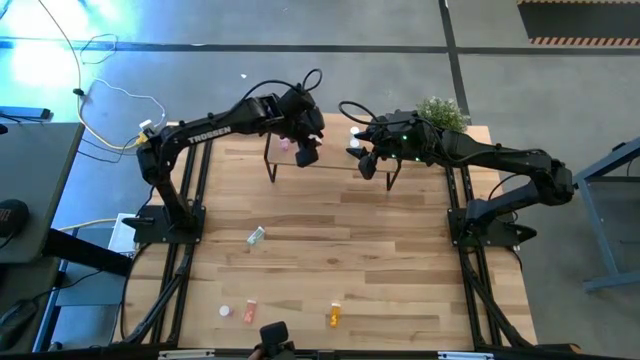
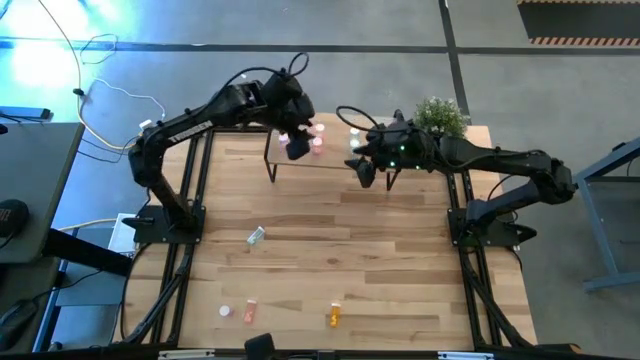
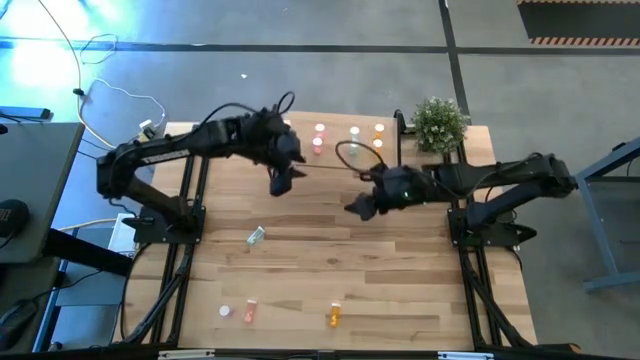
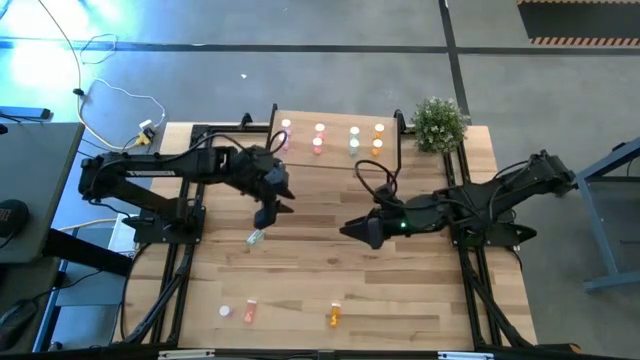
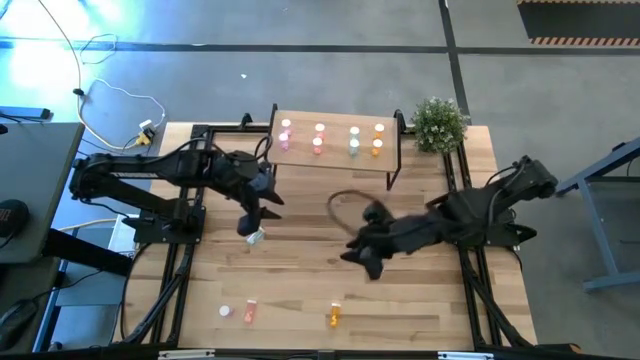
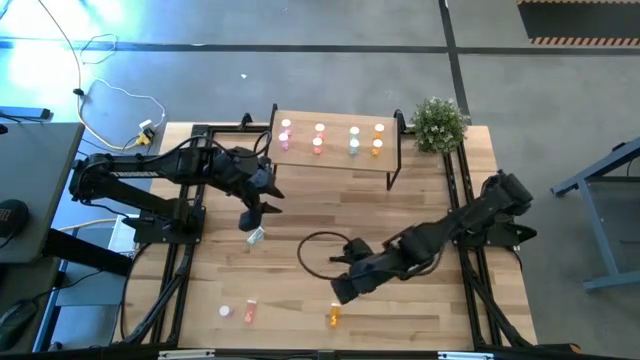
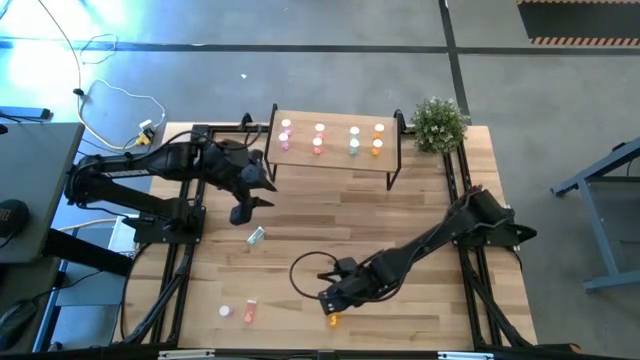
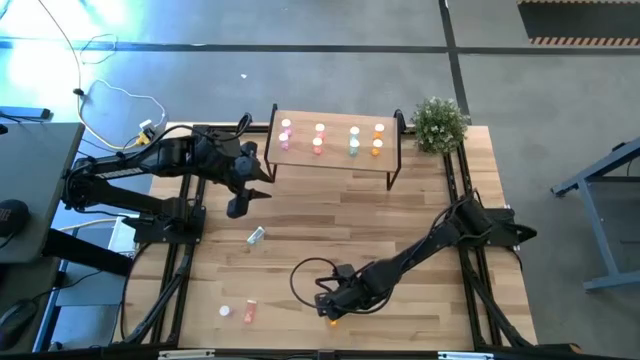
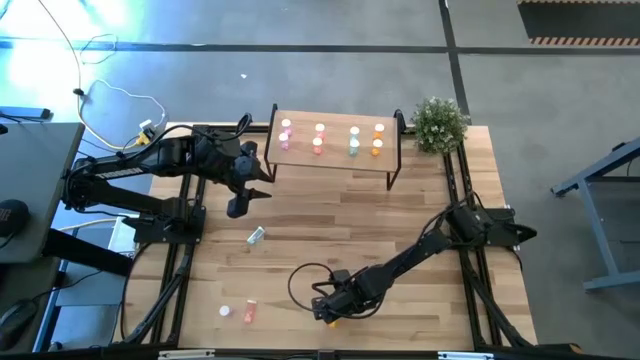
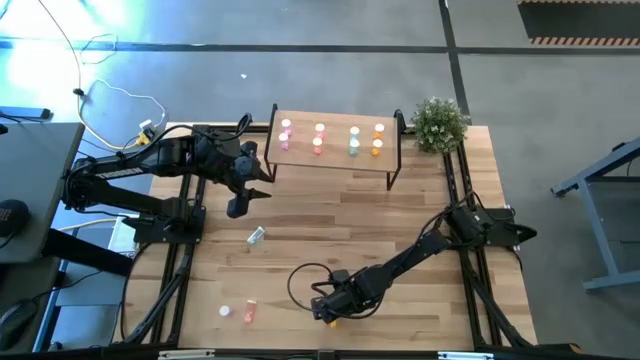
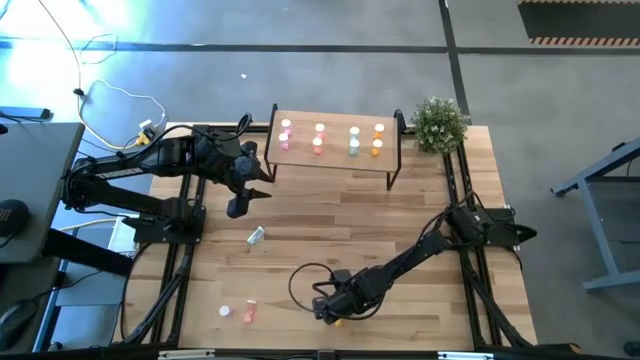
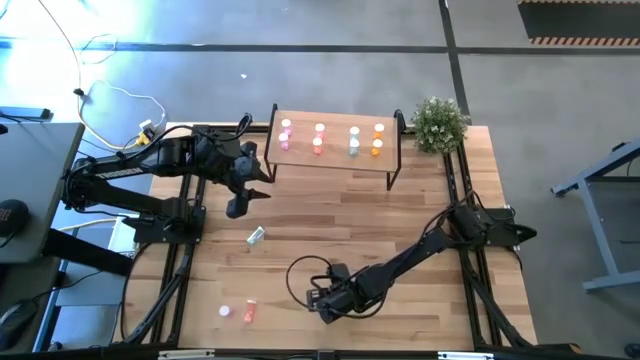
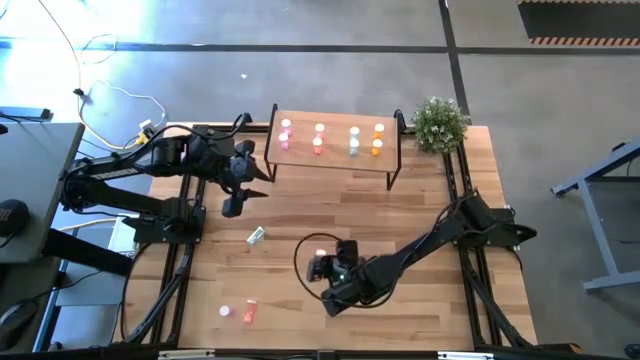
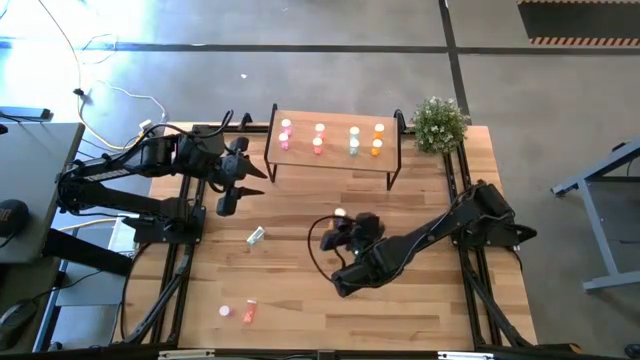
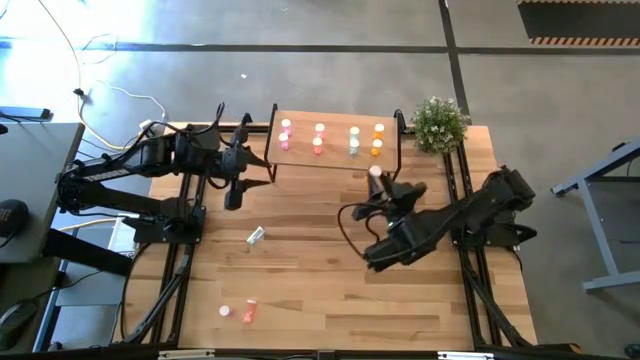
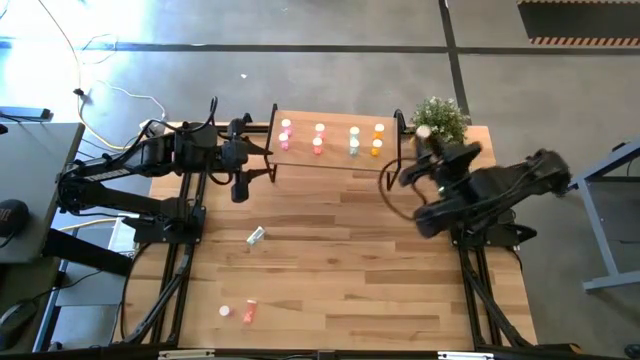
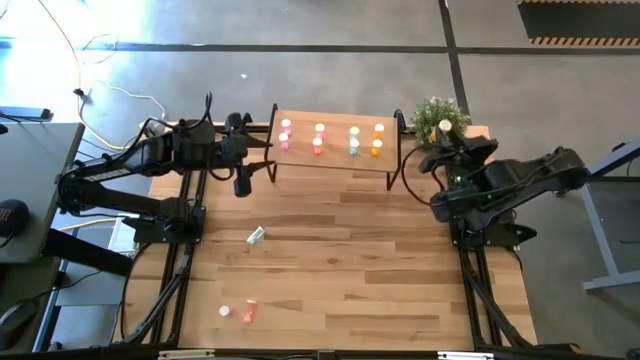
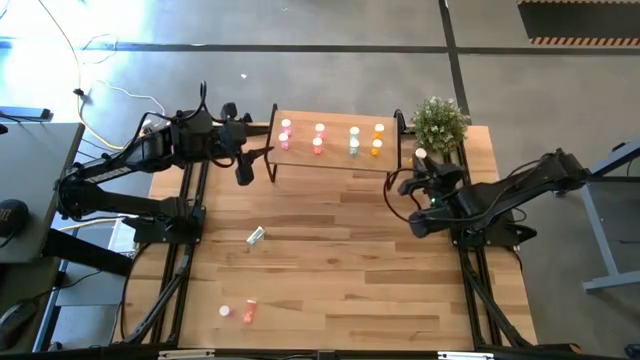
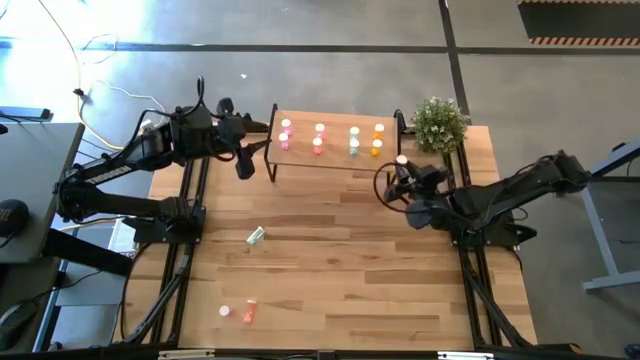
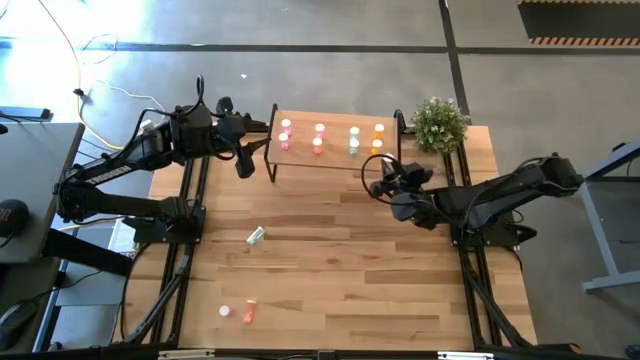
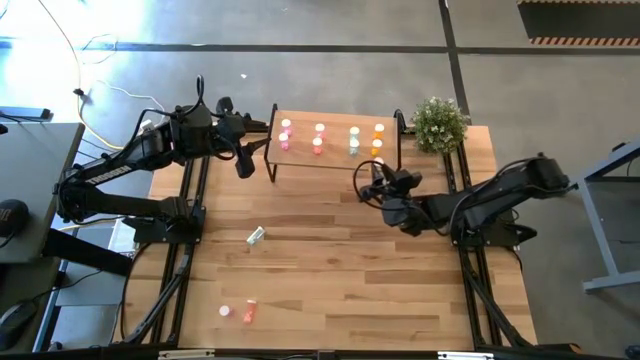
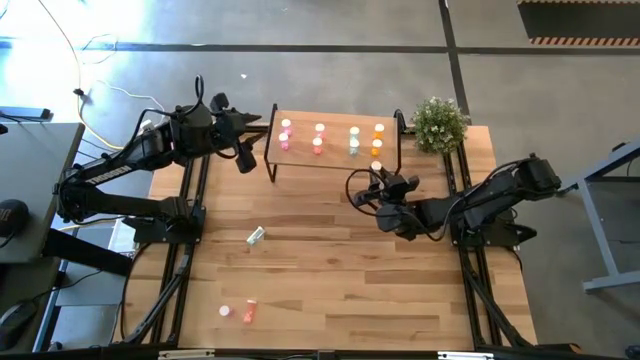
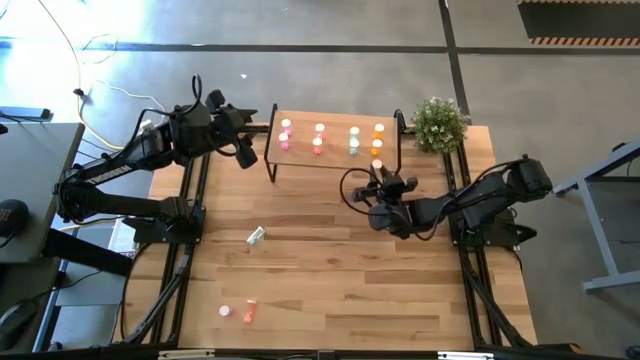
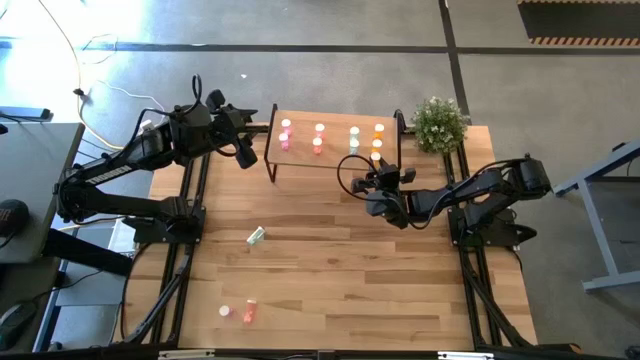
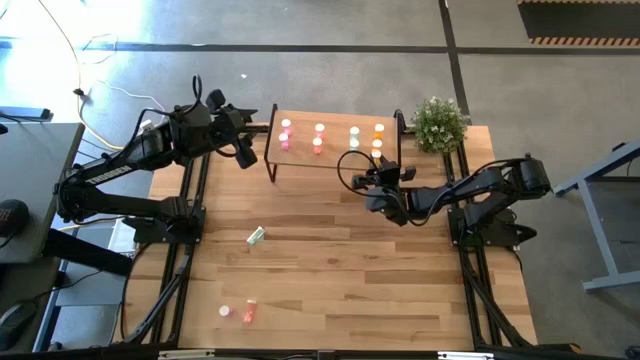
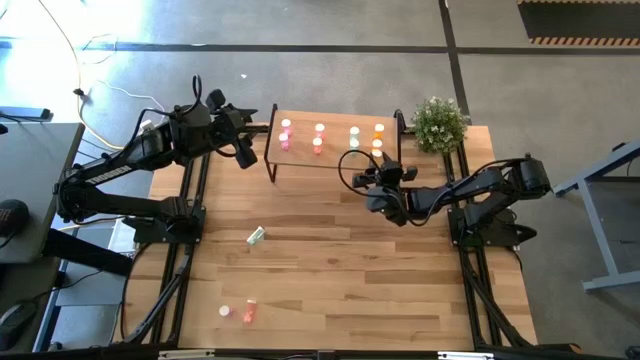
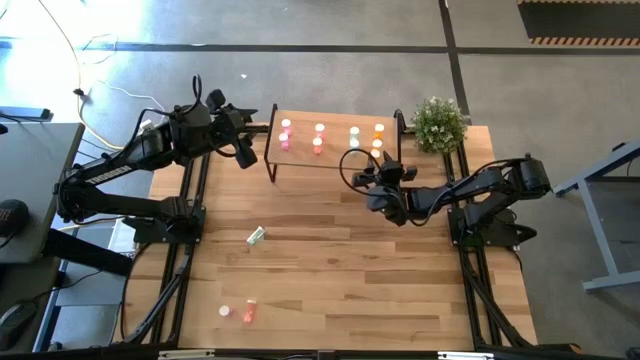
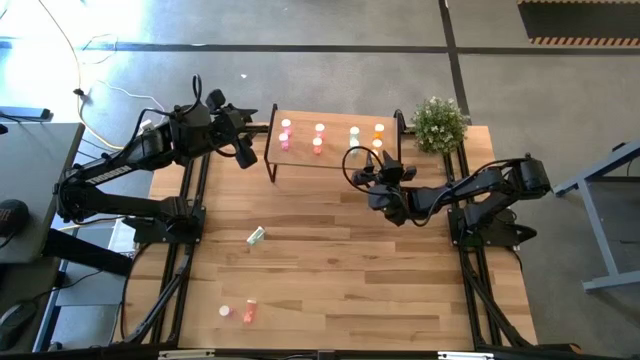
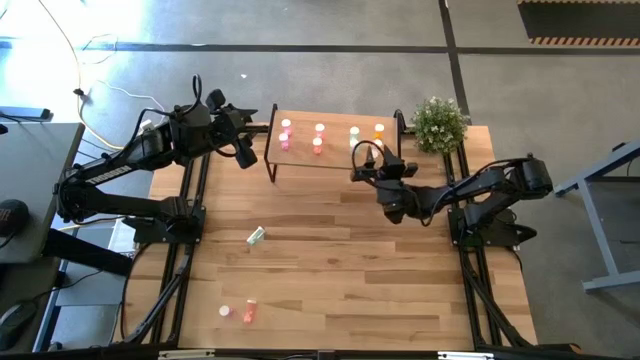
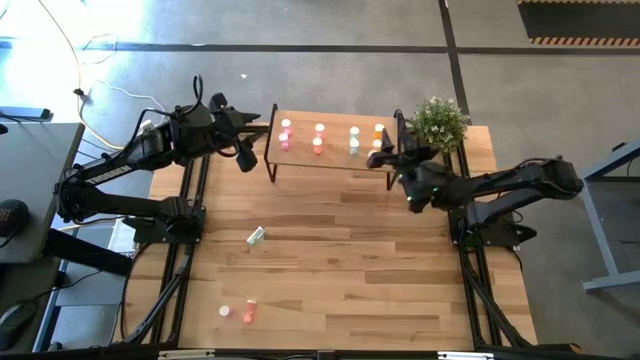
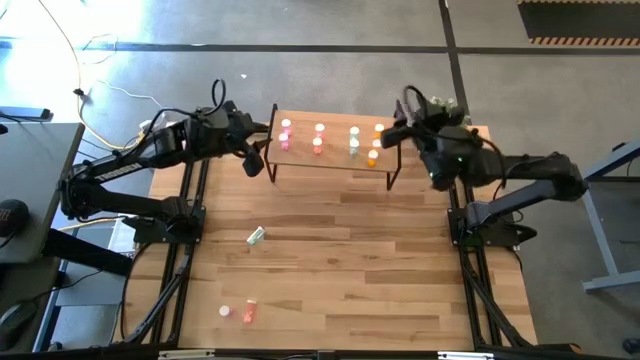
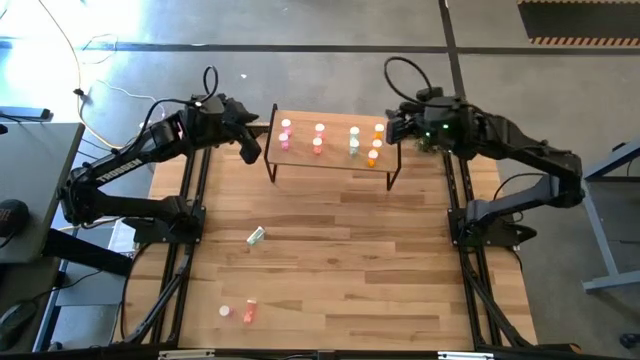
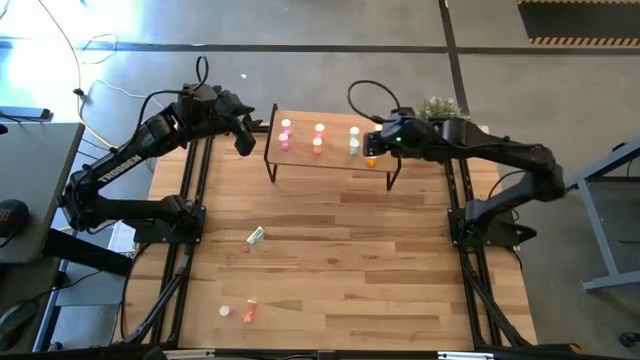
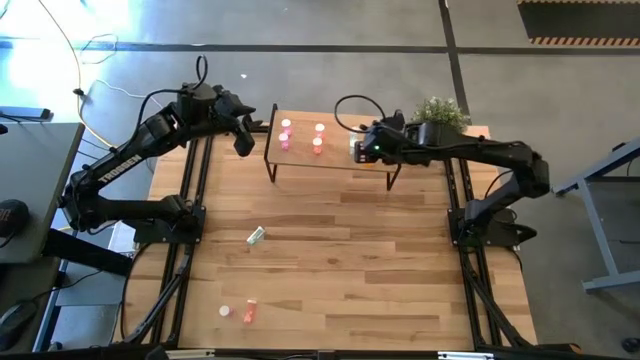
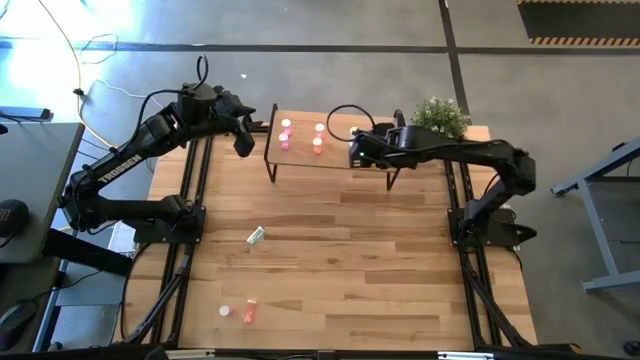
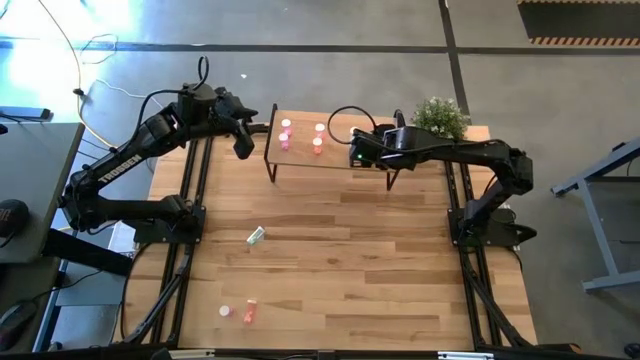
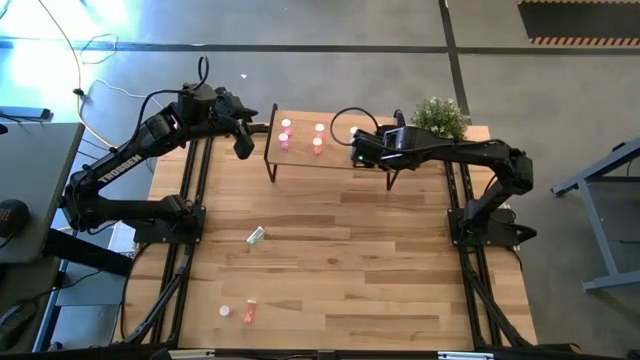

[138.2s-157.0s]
Task: Pick and place medicine bottles onto shelf by color
Put the orange pill bottle aligned with the other orange pill bottle on the shelf

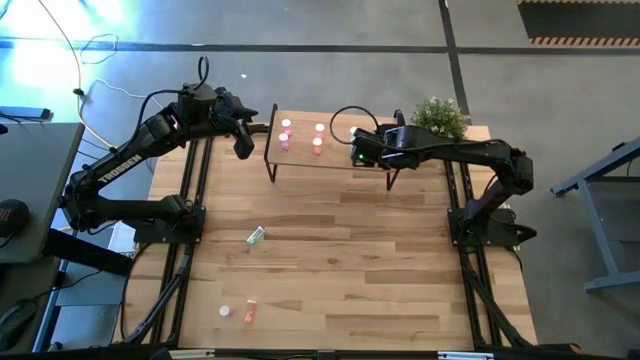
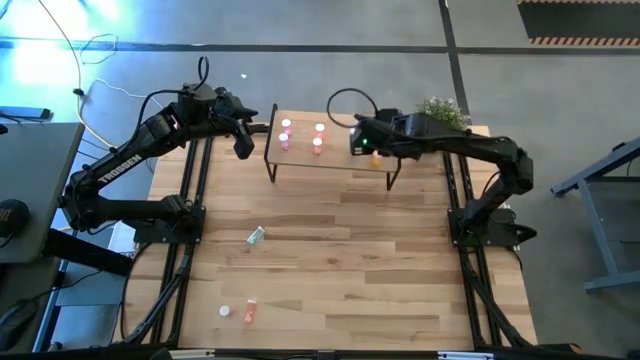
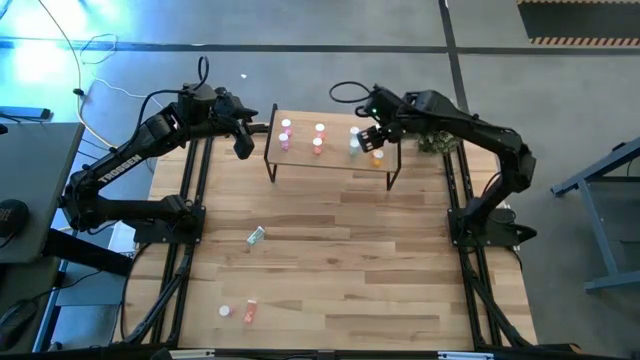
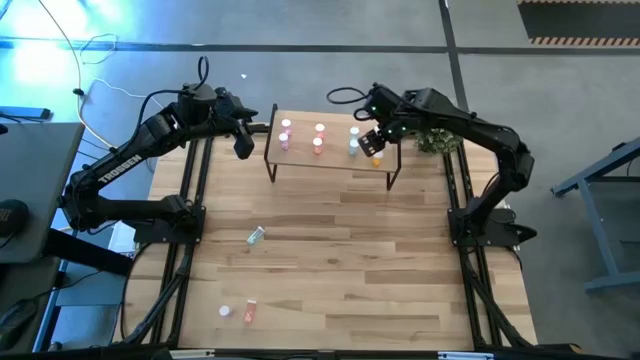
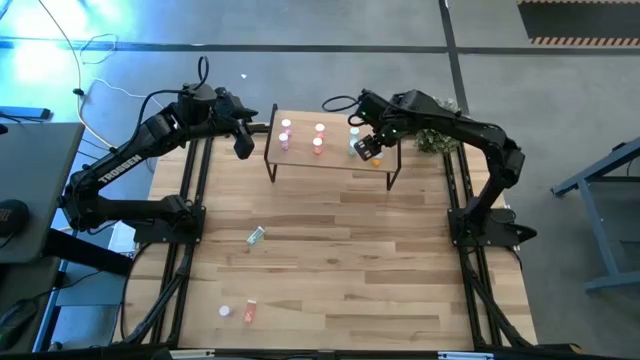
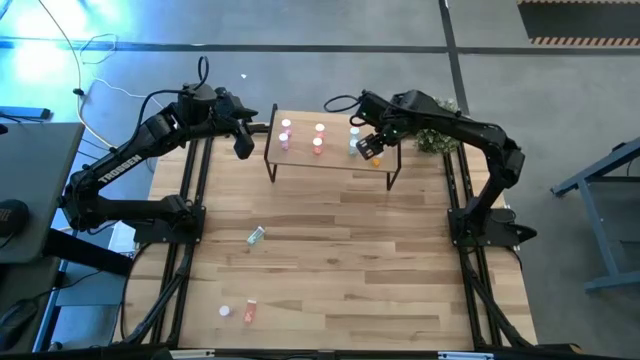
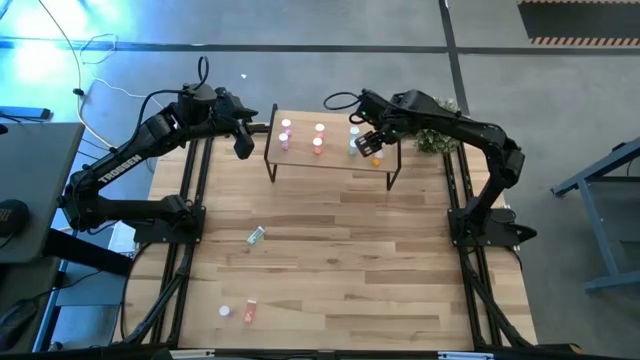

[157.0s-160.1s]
Adjust the orange pill bottle on the shelf
